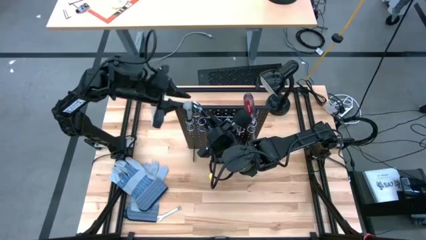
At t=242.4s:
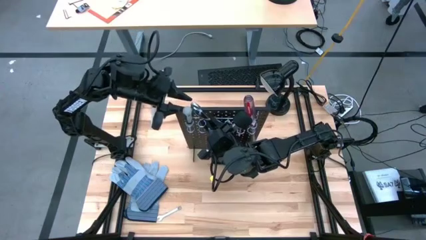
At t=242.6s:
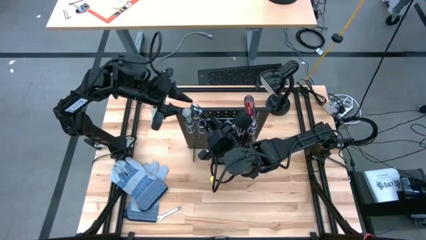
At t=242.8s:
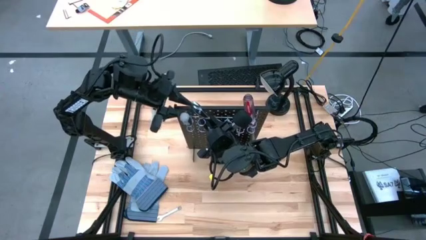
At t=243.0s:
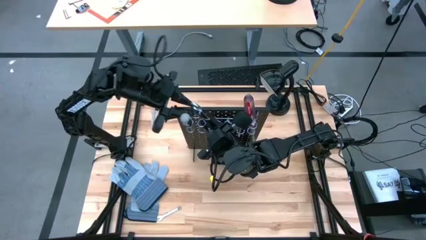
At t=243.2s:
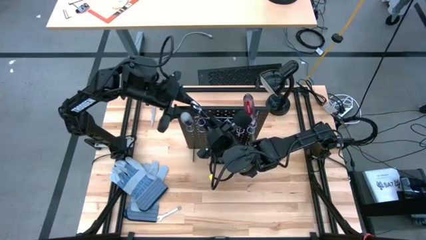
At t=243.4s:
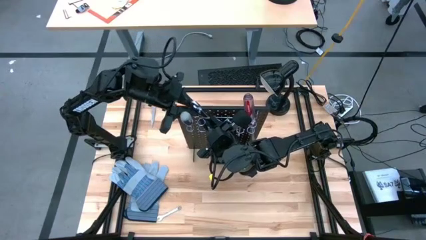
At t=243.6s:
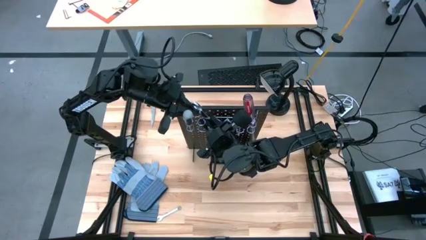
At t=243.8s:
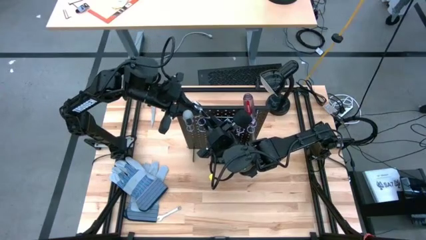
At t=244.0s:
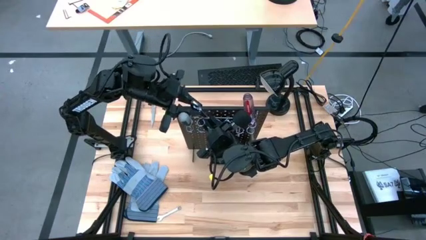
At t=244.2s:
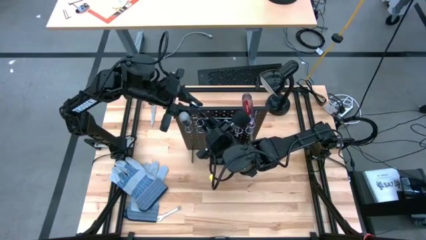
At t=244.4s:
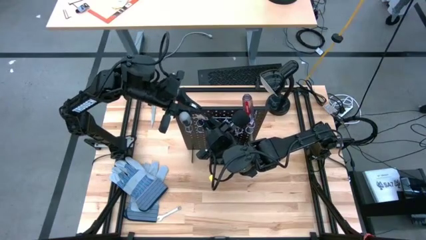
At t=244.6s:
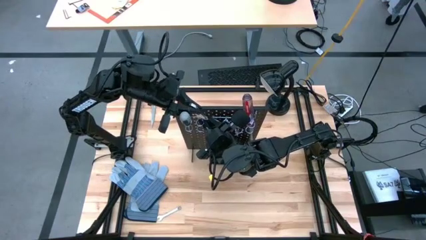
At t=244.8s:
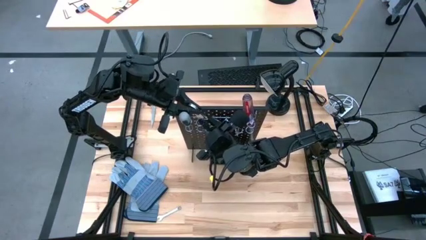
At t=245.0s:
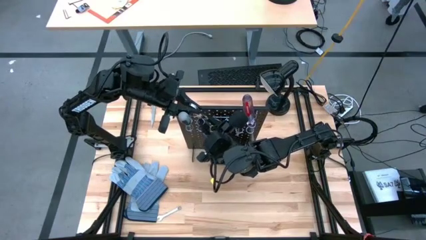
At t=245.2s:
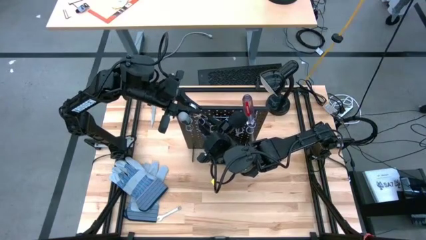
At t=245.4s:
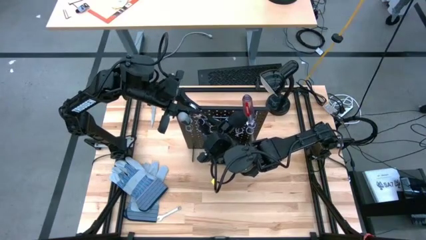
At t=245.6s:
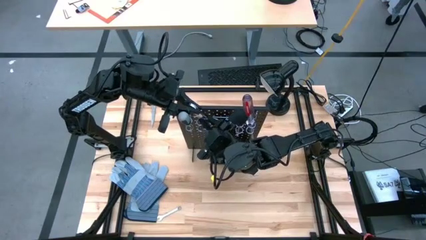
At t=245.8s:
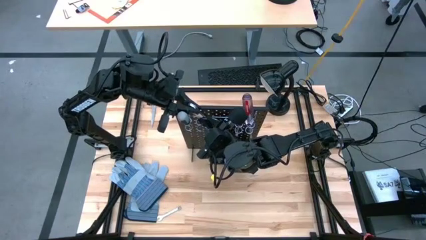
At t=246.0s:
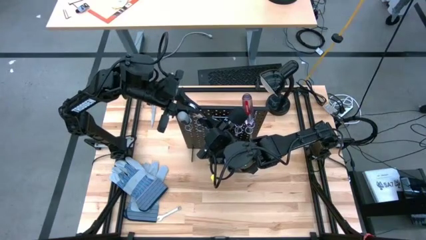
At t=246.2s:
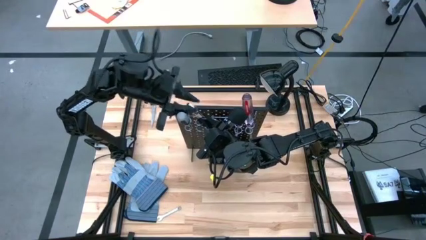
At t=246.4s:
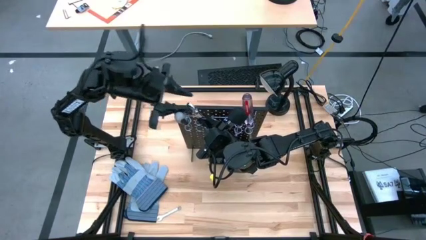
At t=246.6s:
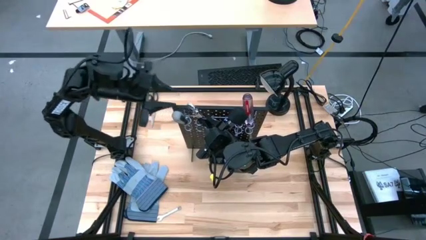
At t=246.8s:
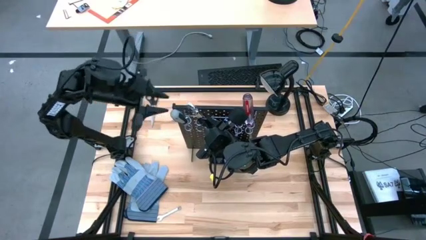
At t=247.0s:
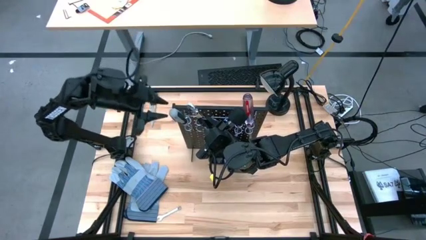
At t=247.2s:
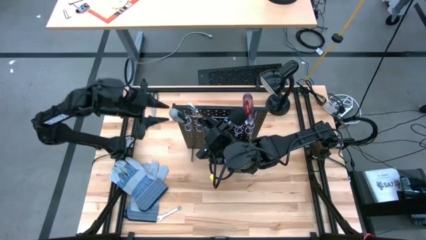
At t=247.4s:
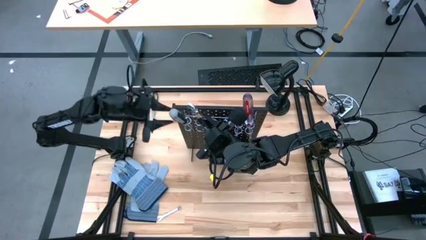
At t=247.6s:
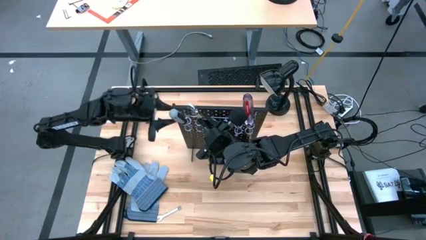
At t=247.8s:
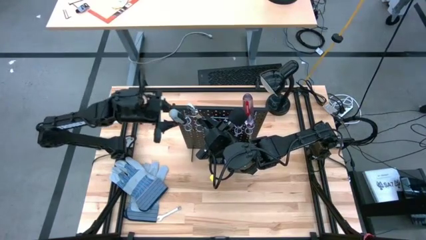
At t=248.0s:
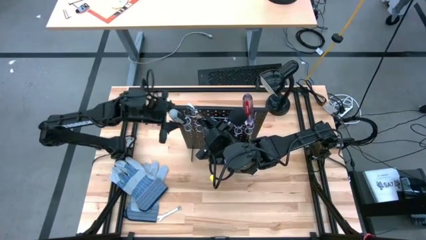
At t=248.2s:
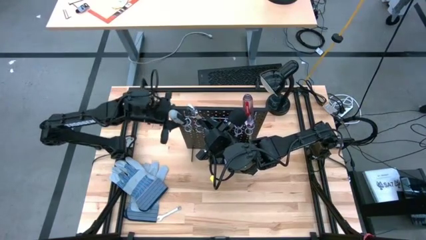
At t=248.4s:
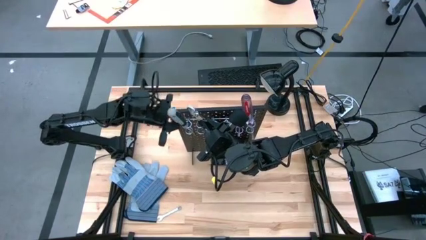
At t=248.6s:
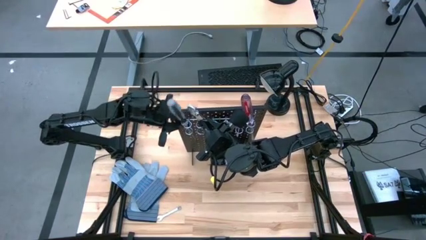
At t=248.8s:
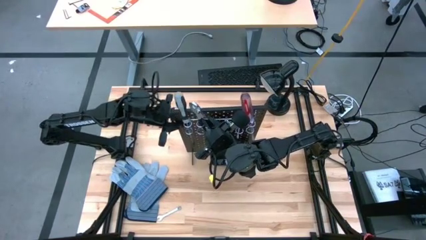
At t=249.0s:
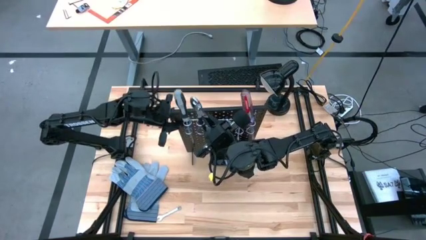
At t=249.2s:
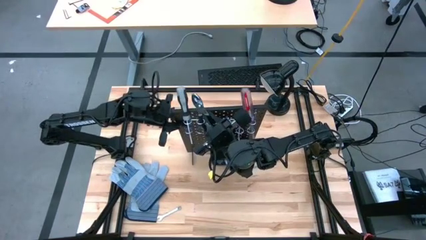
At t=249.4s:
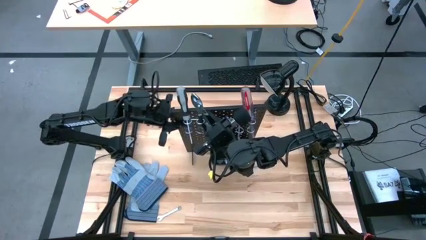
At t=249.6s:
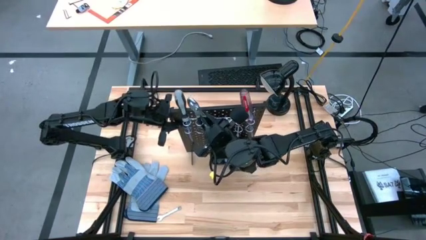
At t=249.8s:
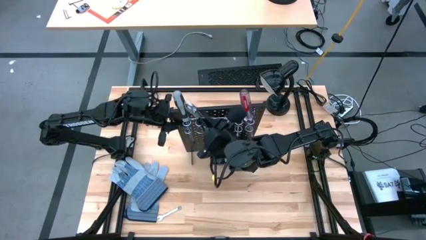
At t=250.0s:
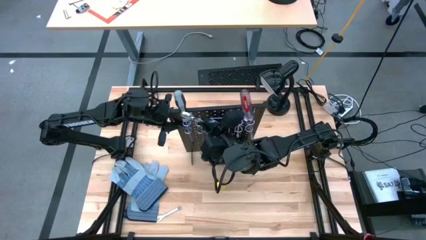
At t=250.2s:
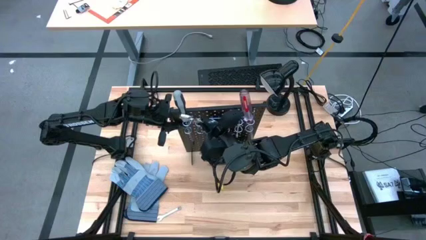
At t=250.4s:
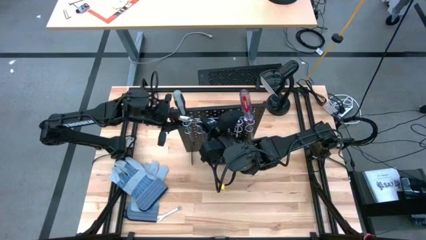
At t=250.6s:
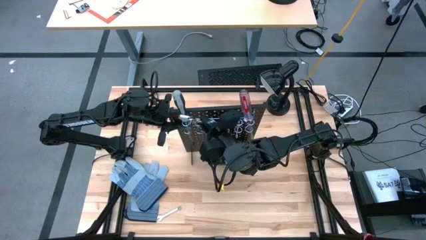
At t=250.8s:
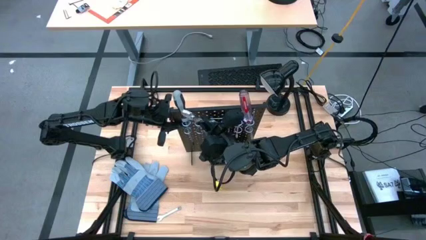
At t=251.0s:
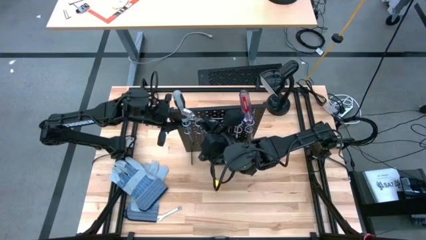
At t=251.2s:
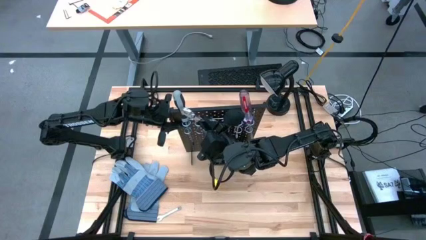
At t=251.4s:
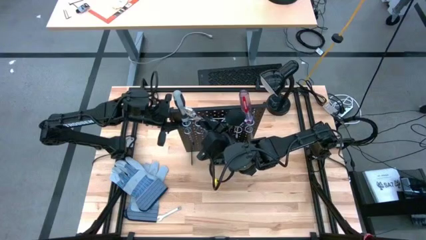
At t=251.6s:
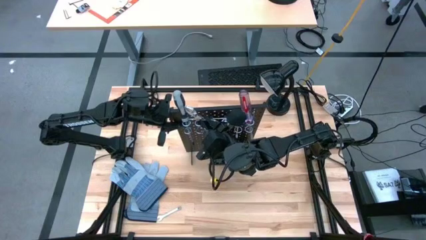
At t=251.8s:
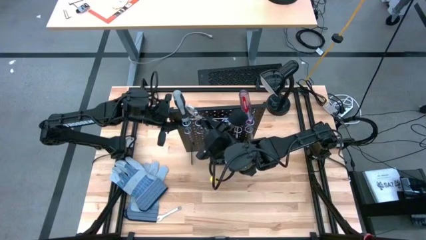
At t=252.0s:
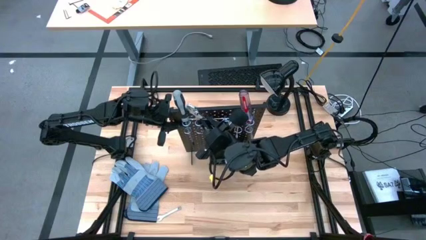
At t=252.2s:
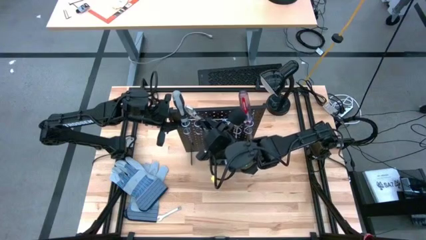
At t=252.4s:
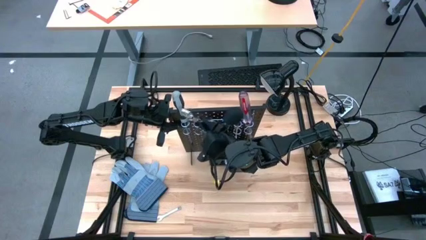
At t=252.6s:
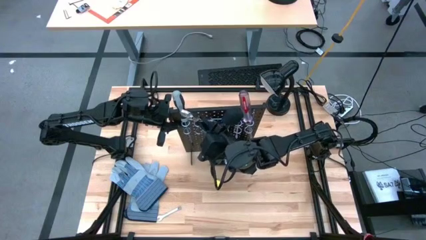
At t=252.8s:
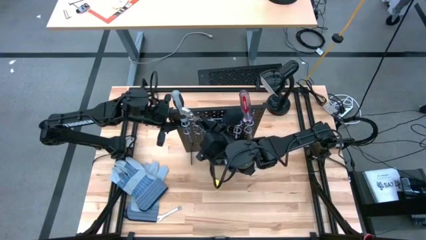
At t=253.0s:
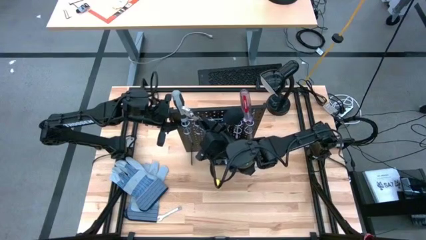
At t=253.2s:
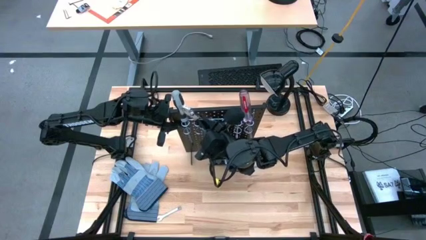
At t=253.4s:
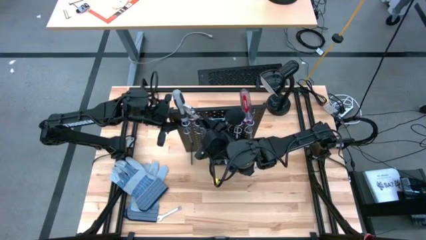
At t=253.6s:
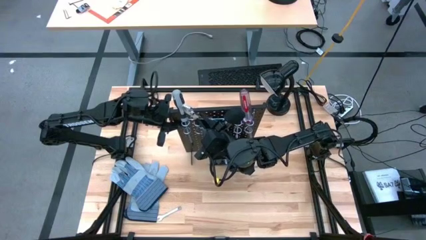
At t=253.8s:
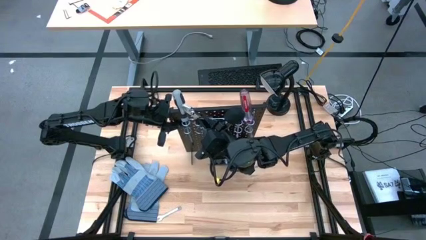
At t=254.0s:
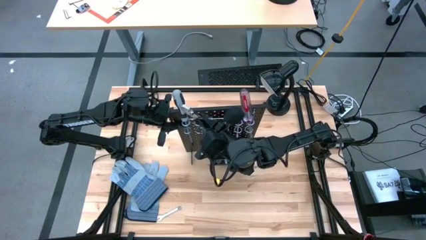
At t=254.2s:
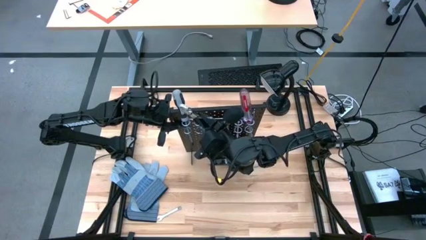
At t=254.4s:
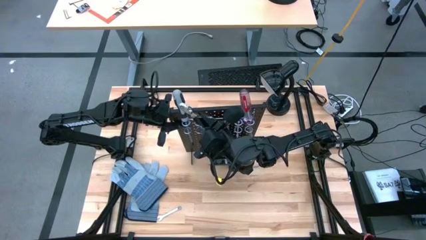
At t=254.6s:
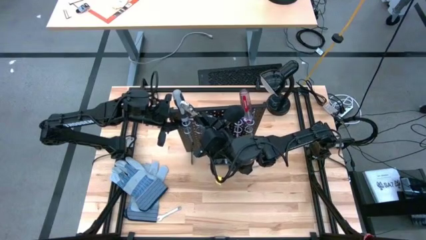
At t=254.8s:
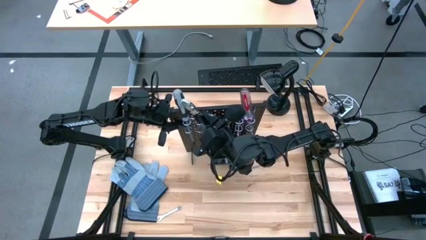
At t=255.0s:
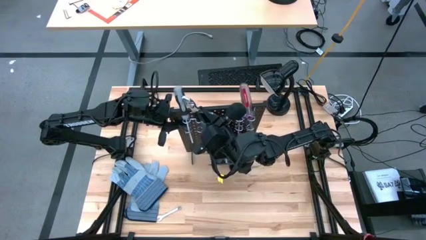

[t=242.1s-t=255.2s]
Task: Hang tools onto peg board
Unhang the black pliers from the black peg board
